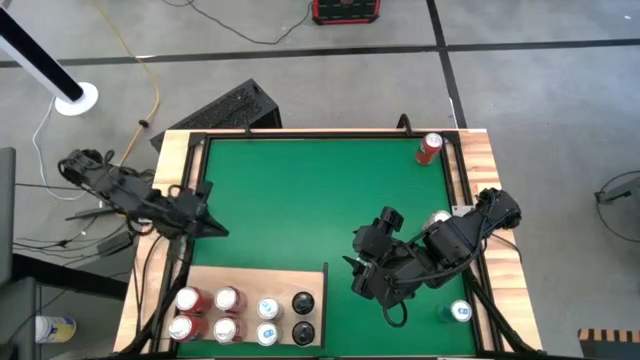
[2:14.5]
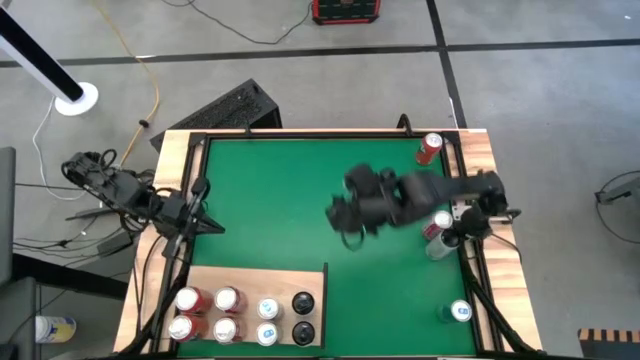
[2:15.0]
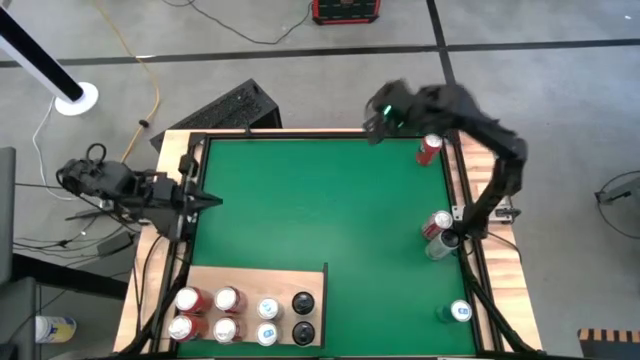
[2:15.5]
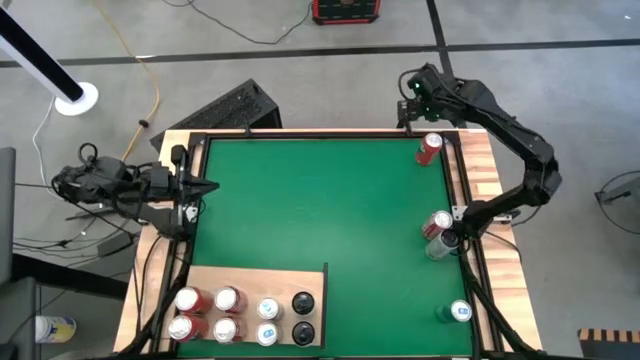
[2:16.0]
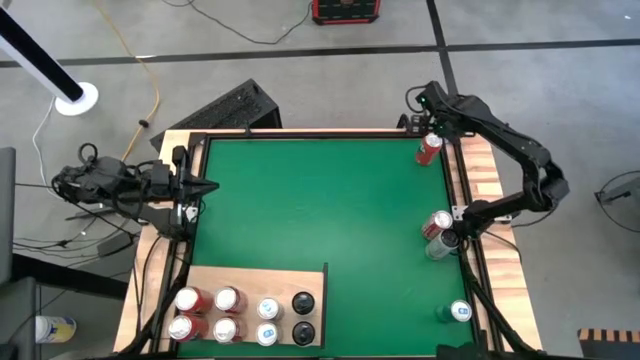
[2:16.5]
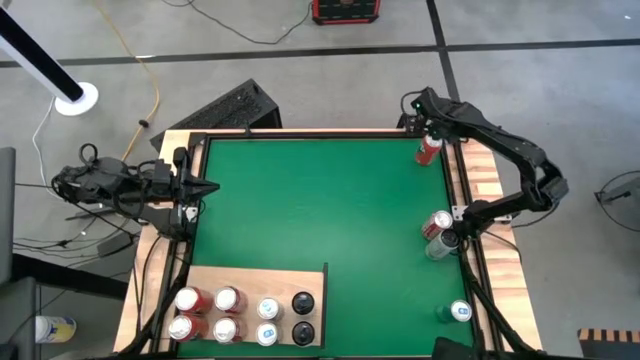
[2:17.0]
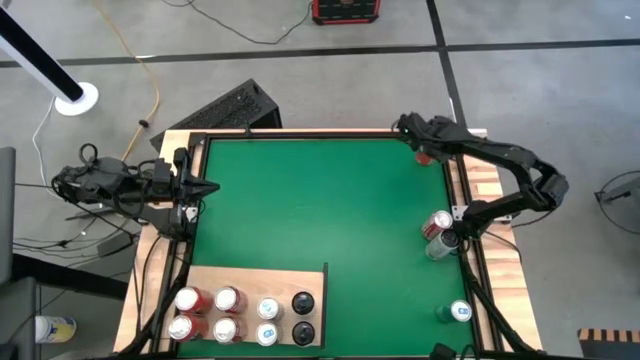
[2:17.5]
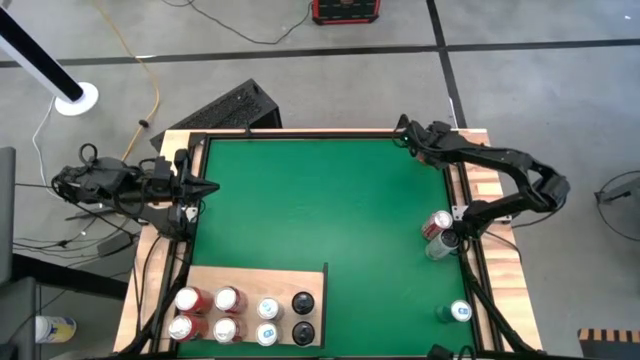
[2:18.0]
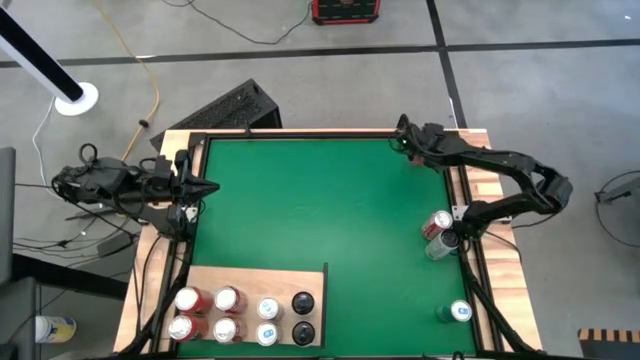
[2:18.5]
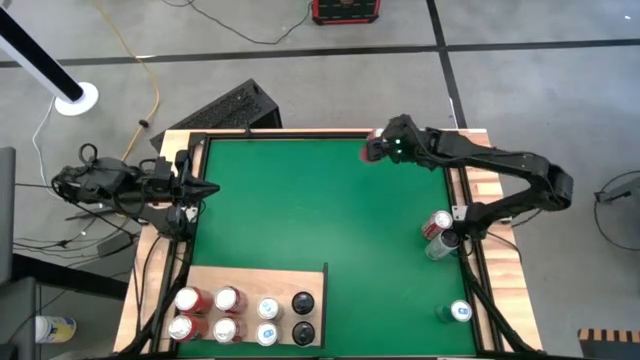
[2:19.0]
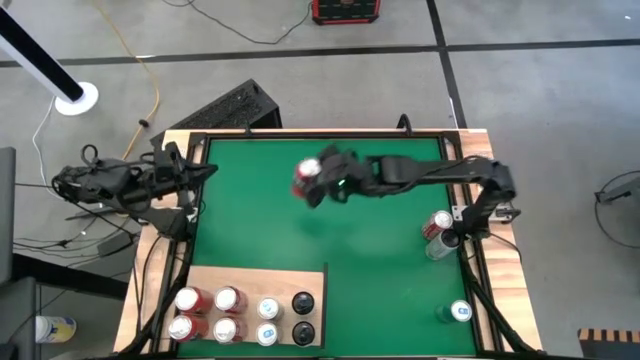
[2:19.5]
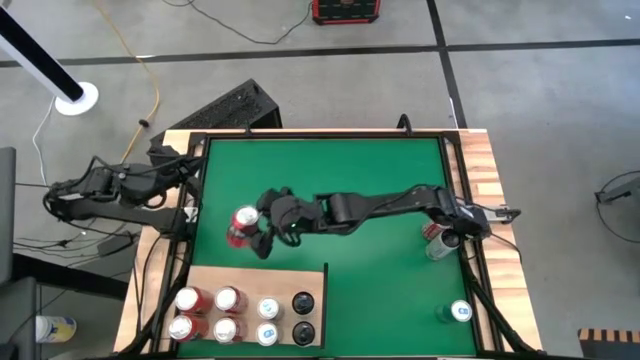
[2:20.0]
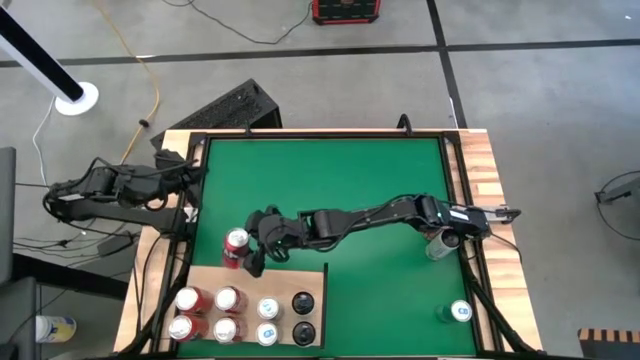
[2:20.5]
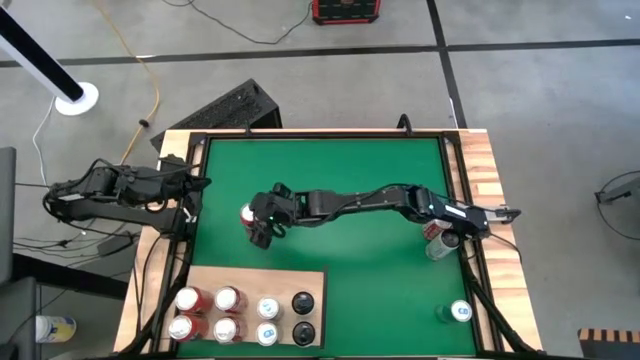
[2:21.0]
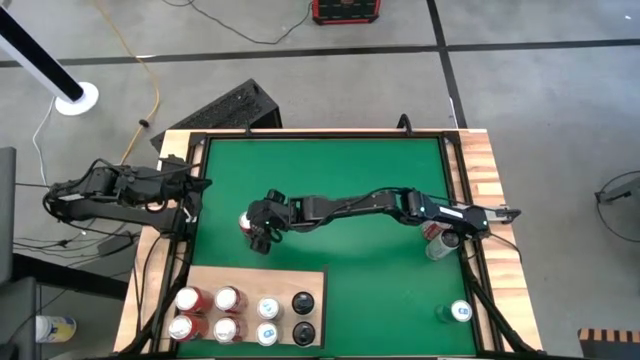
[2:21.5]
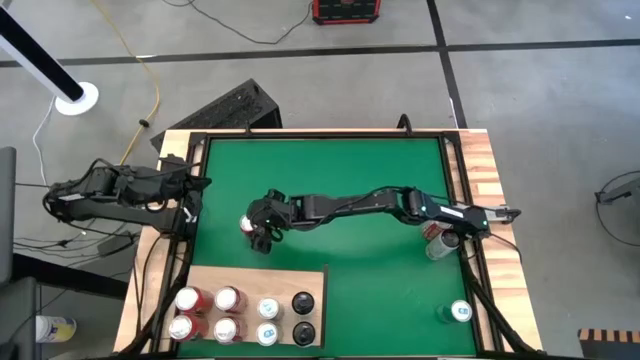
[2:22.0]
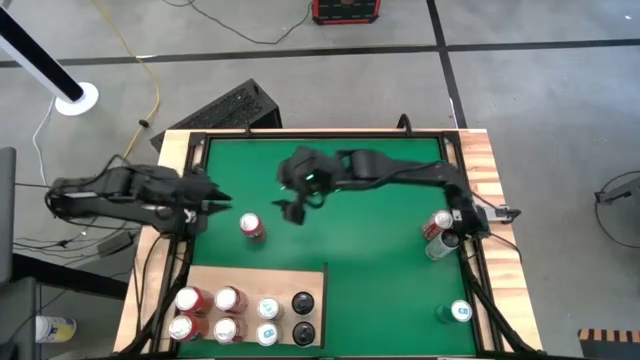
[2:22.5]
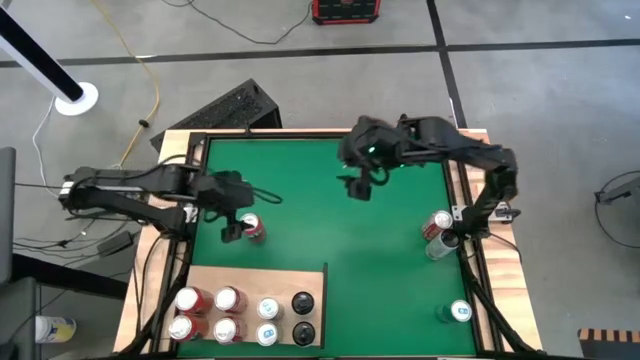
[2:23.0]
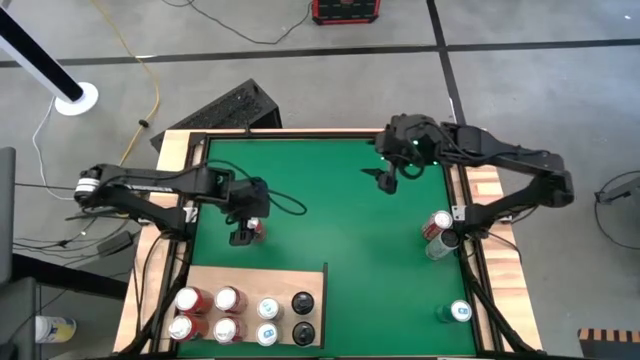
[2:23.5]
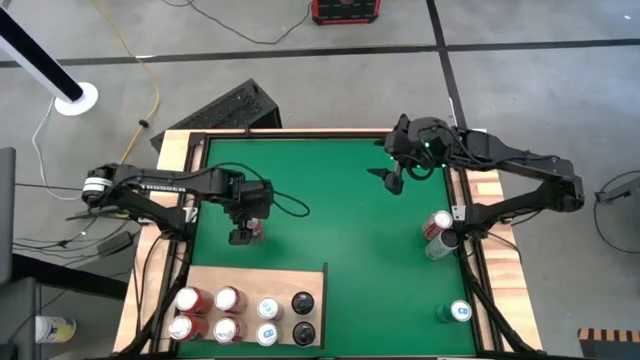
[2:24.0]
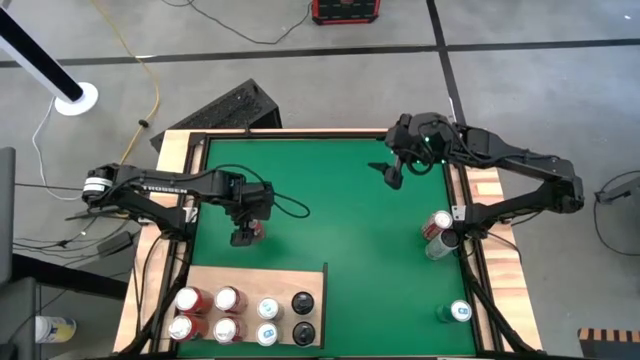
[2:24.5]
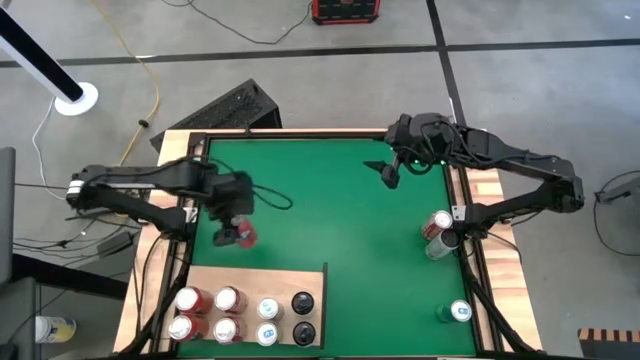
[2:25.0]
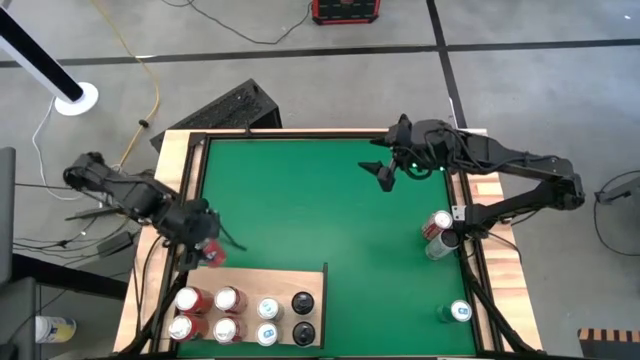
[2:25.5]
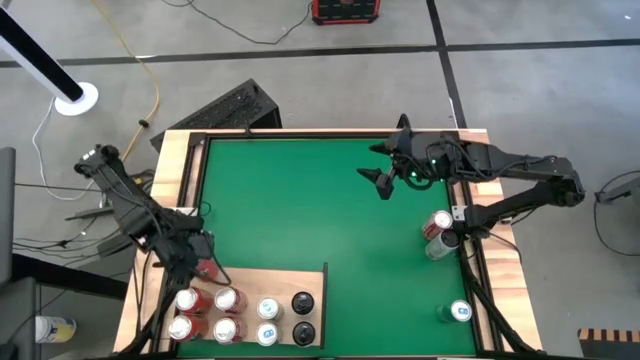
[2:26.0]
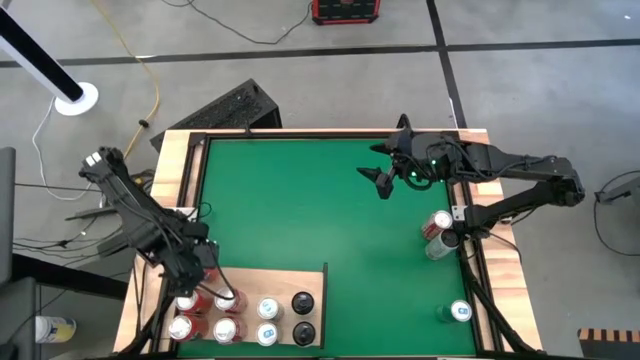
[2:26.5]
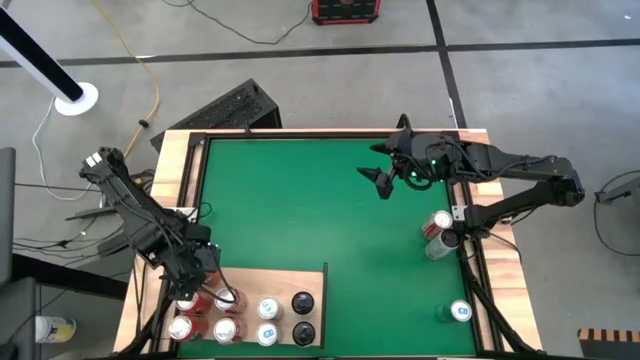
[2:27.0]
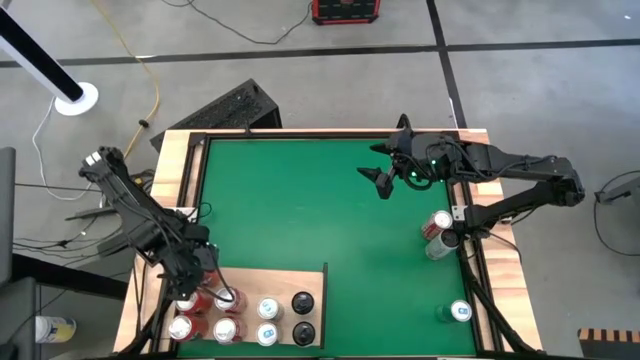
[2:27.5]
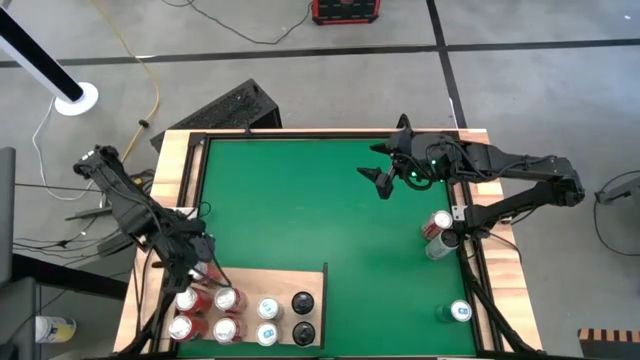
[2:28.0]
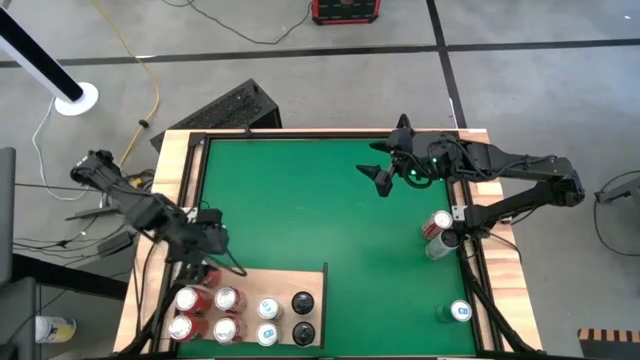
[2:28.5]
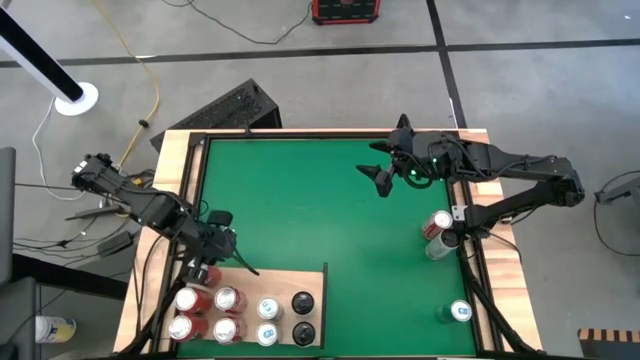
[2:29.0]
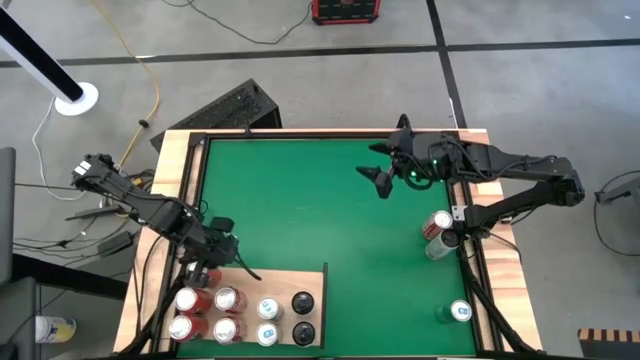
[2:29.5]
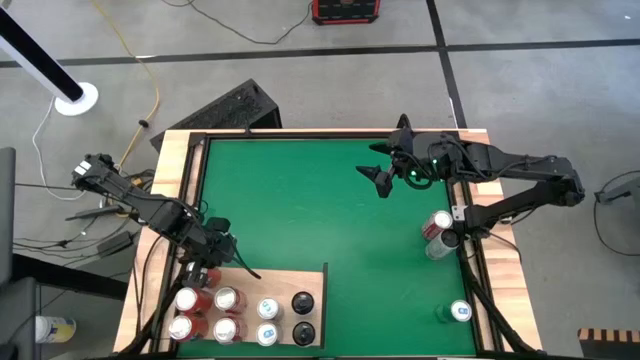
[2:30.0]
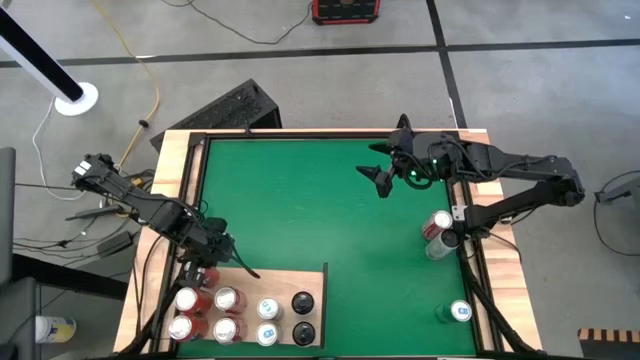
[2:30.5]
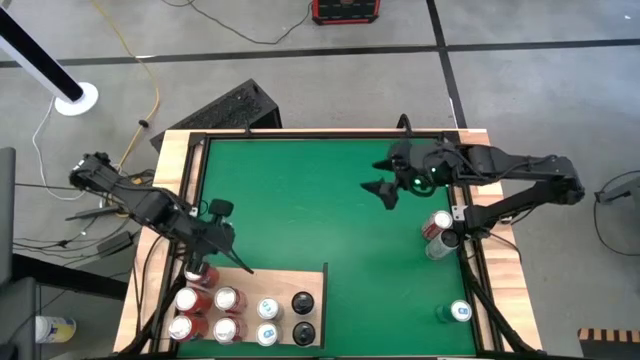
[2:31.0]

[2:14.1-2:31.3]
Task: Place canned beverage on shelf
Put the orange soda can on the shelf aligned with the other orange can

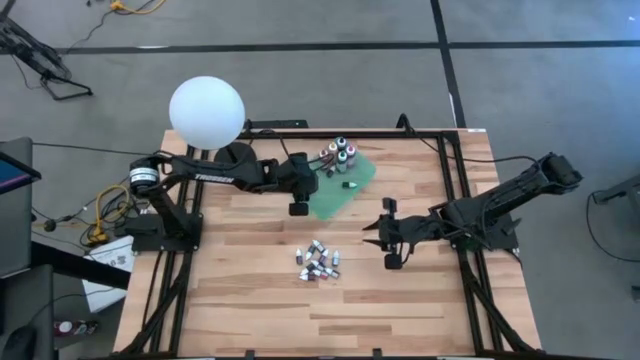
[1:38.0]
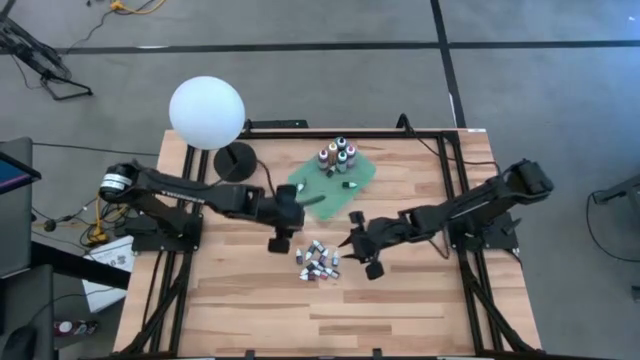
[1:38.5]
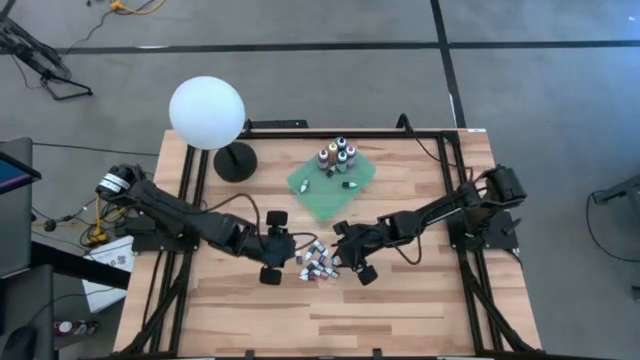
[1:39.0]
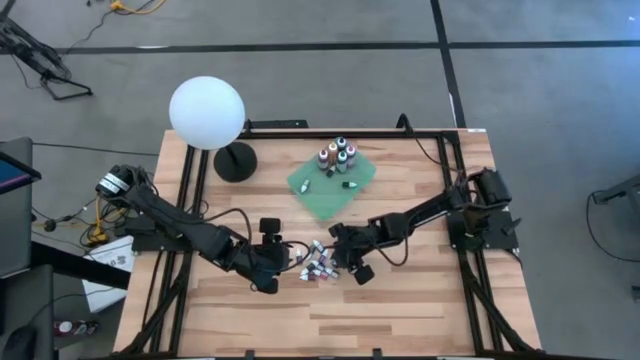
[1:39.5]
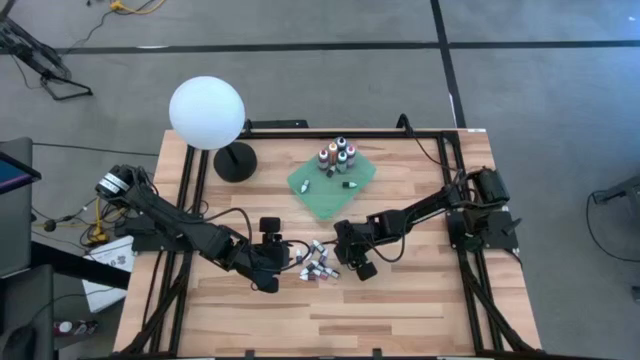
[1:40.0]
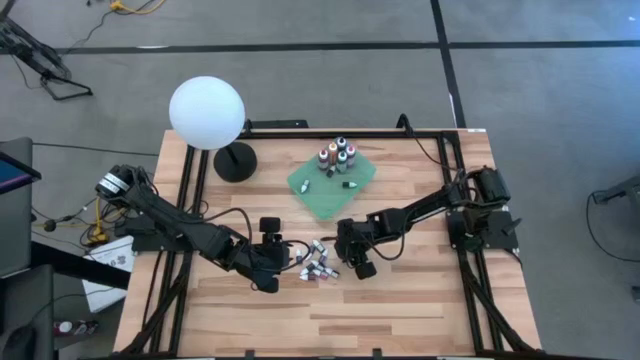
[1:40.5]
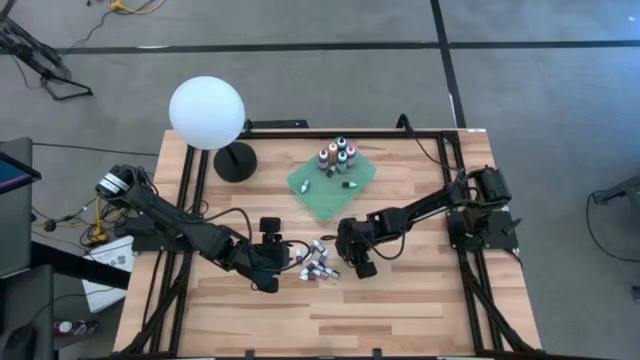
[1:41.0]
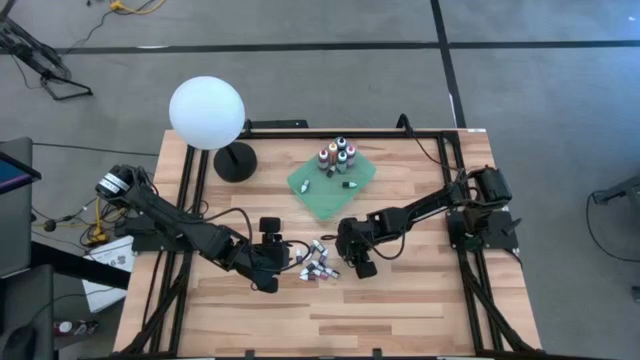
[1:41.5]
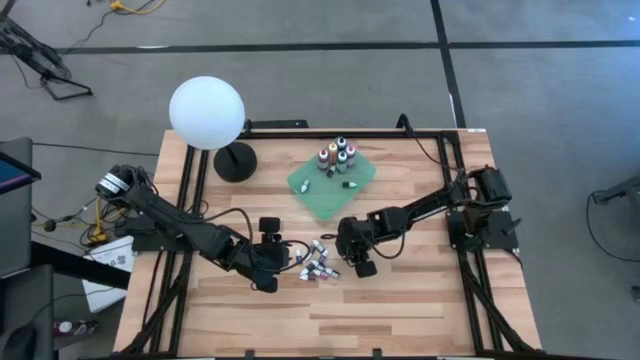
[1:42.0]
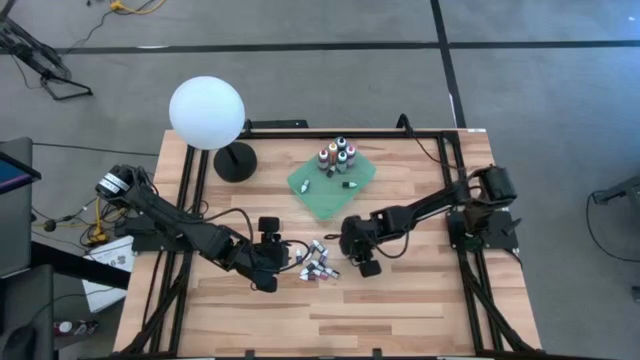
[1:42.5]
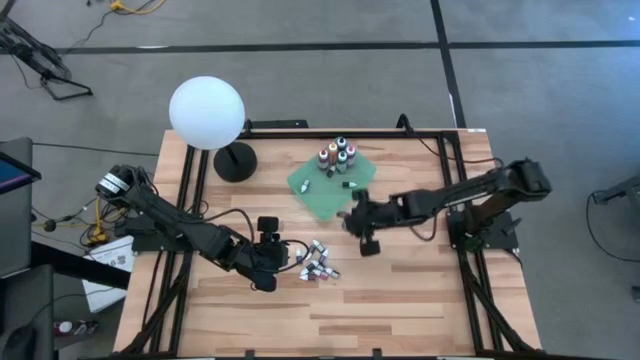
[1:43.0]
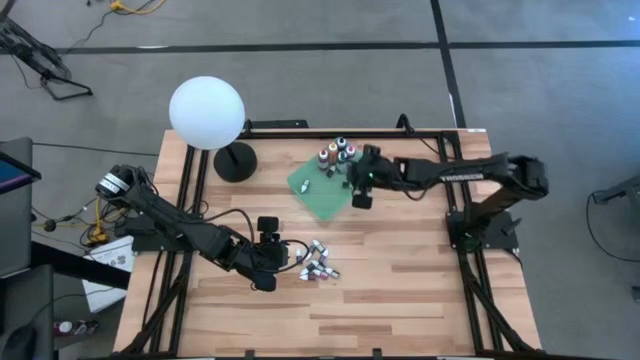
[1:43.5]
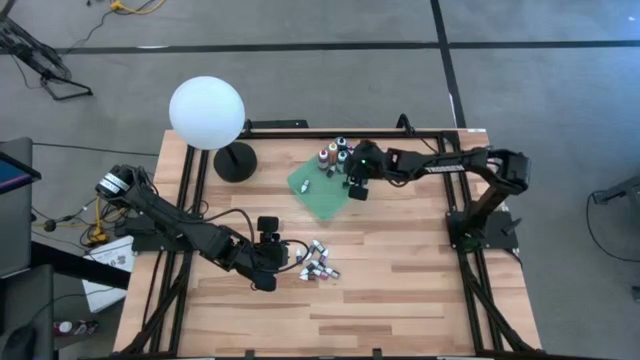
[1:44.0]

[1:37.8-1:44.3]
Task: Pick & Place food coloring
Put the blue food coloring bottle into the green bin
